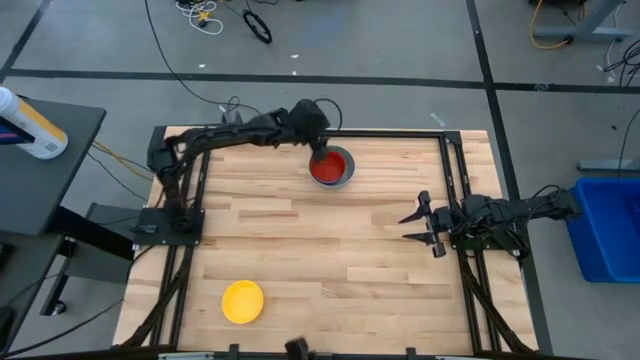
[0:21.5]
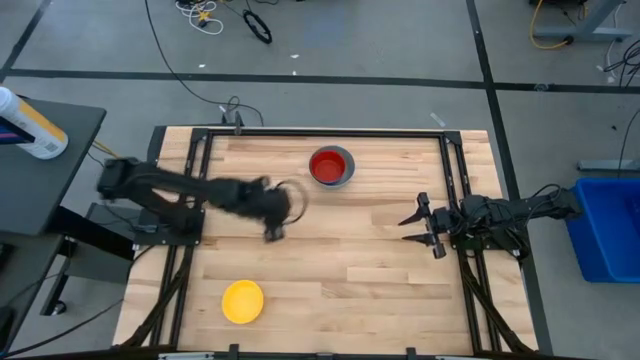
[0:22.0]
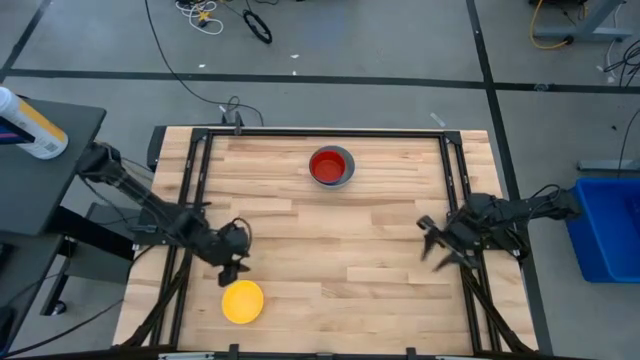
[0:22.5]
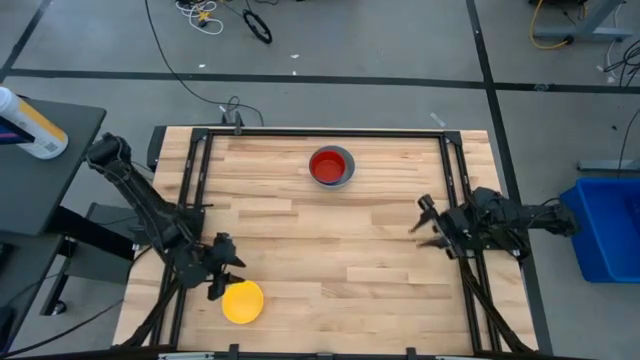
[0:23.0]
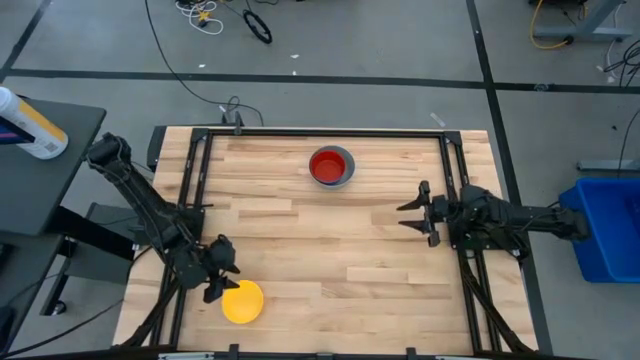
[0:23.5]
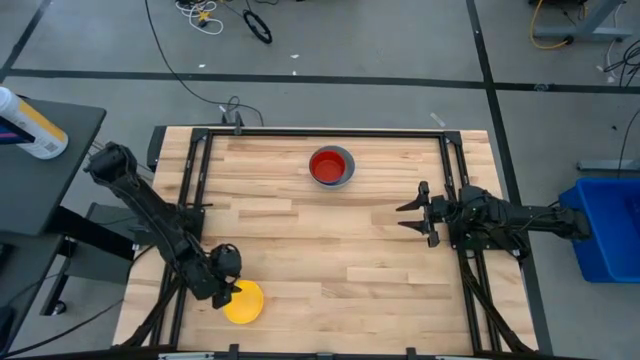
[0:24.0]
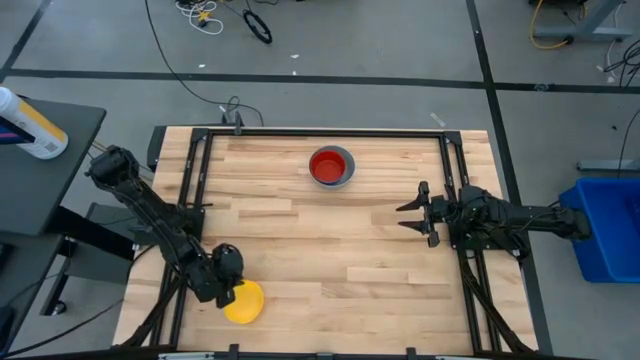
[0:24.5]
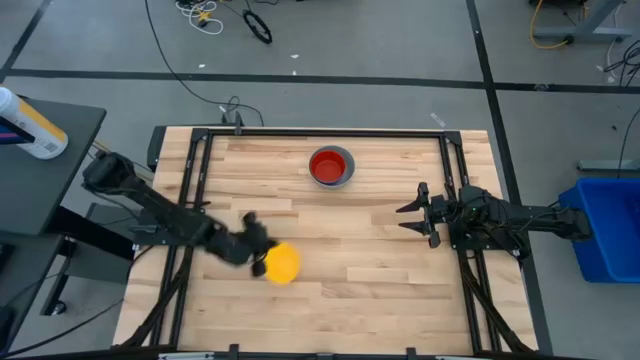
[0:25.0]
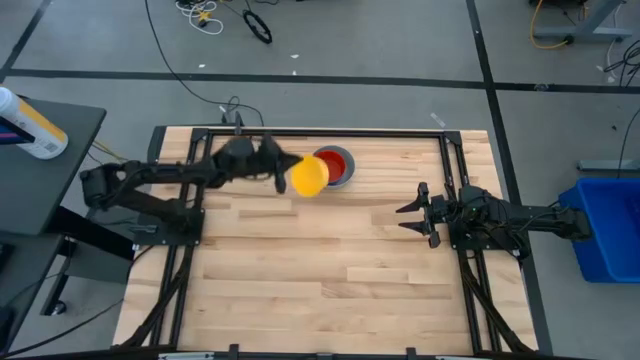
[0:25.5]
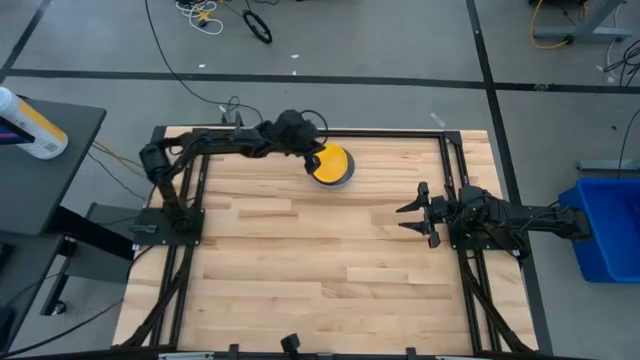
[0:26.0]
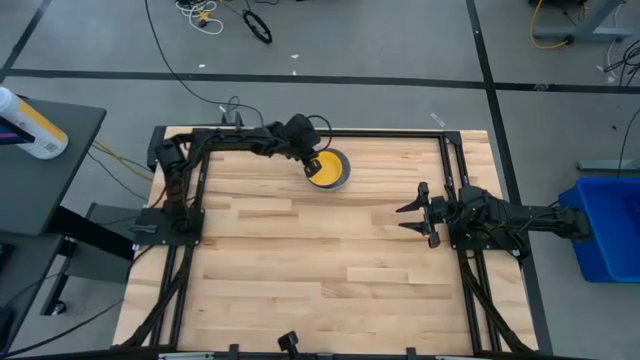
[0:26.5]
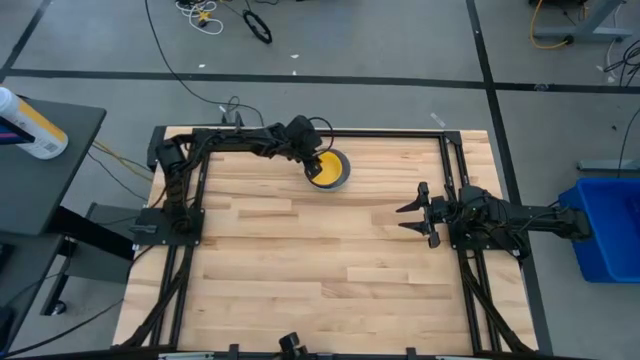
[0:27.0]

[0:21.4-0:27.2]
Stack the yellow bowl on the red bowl

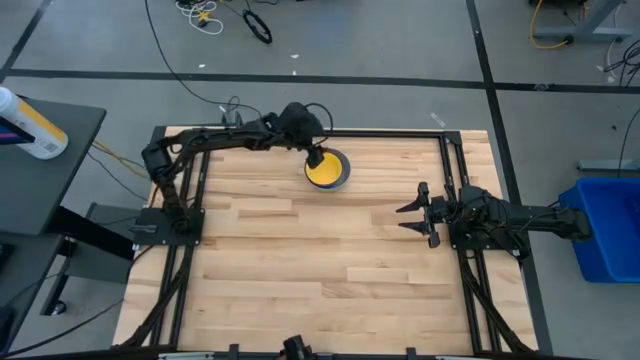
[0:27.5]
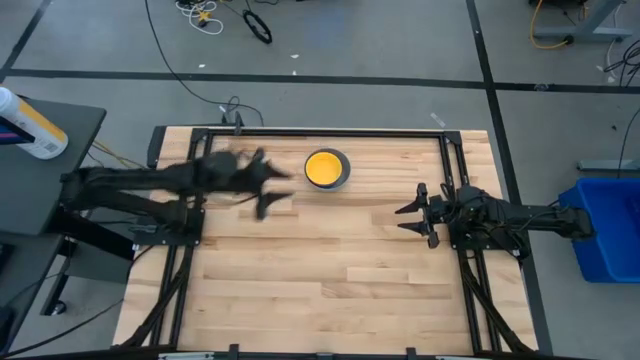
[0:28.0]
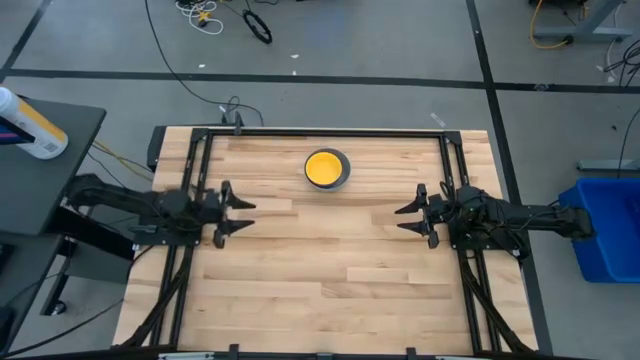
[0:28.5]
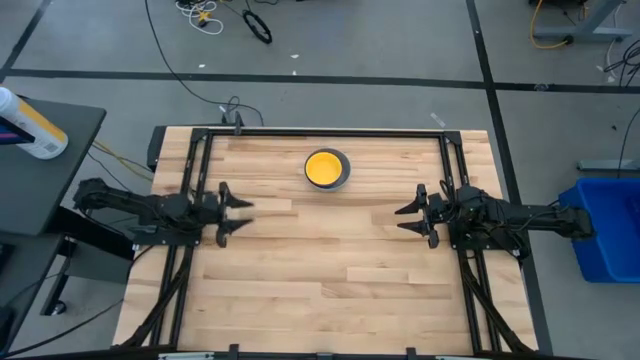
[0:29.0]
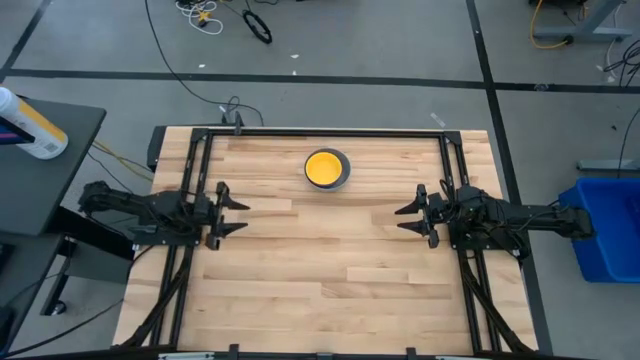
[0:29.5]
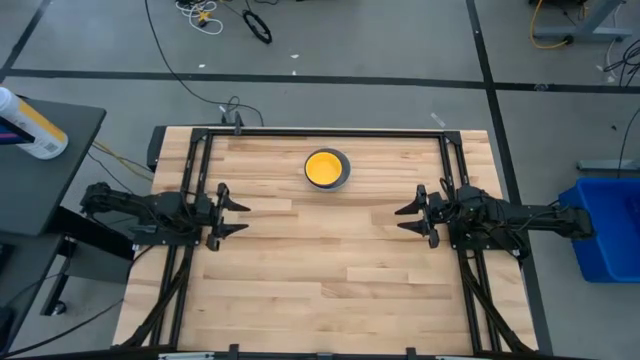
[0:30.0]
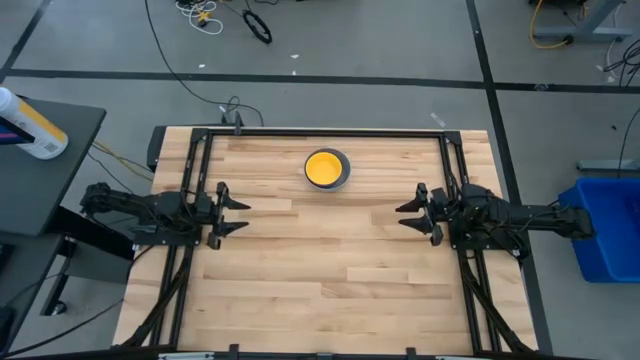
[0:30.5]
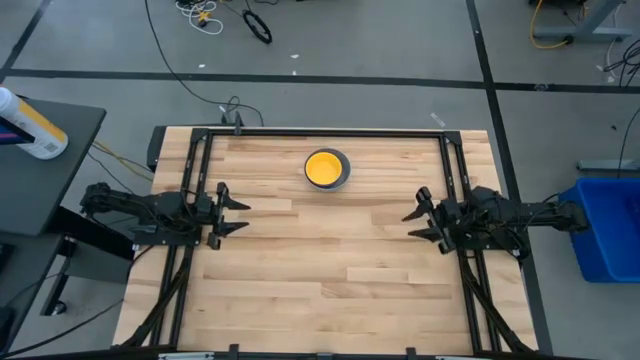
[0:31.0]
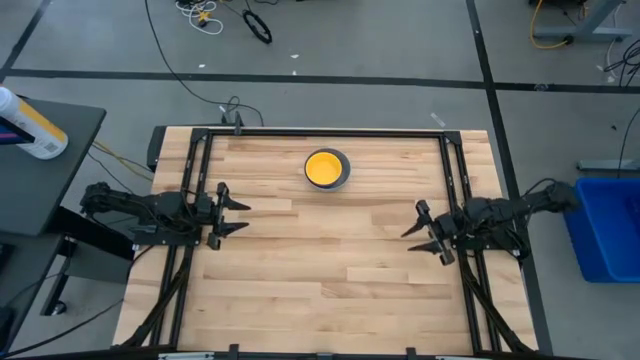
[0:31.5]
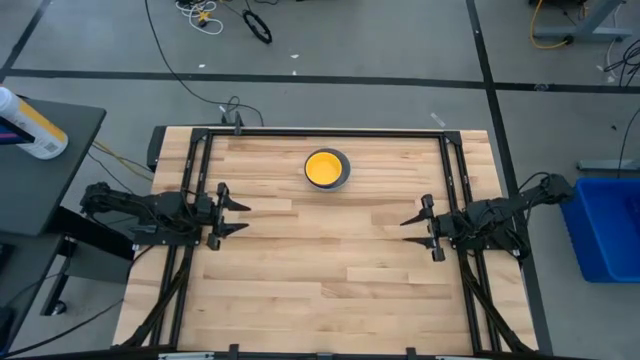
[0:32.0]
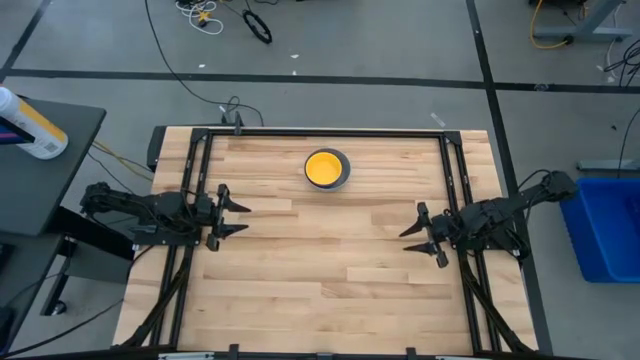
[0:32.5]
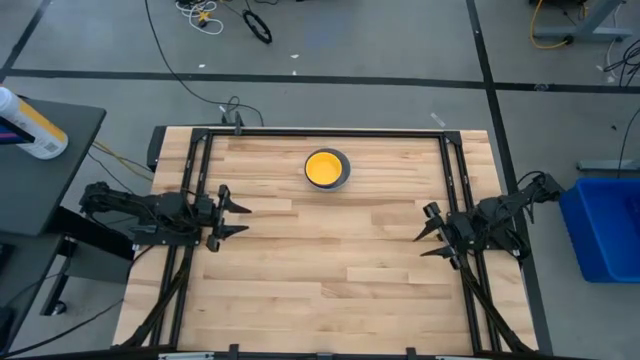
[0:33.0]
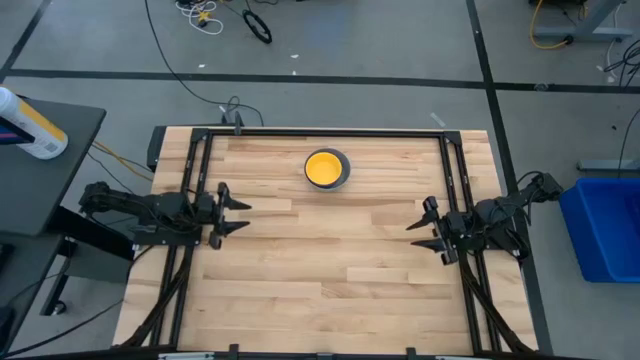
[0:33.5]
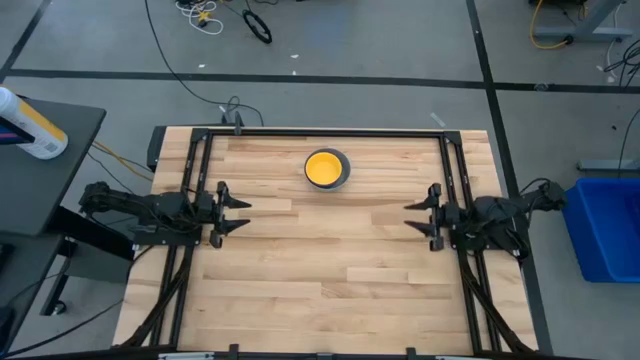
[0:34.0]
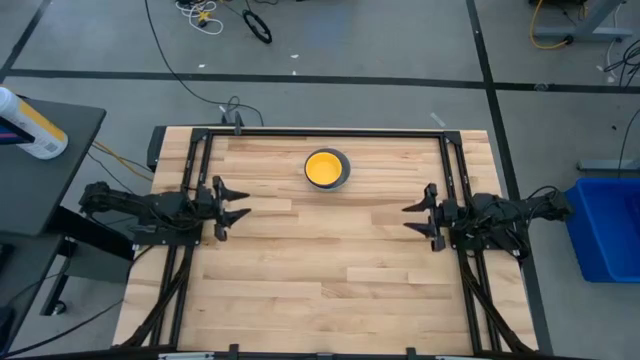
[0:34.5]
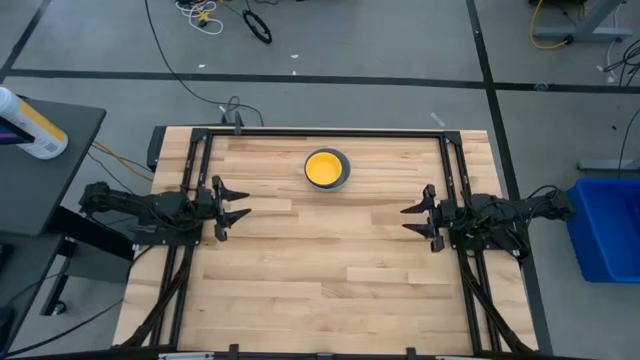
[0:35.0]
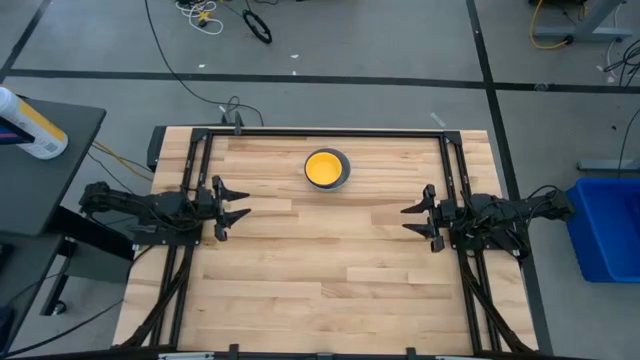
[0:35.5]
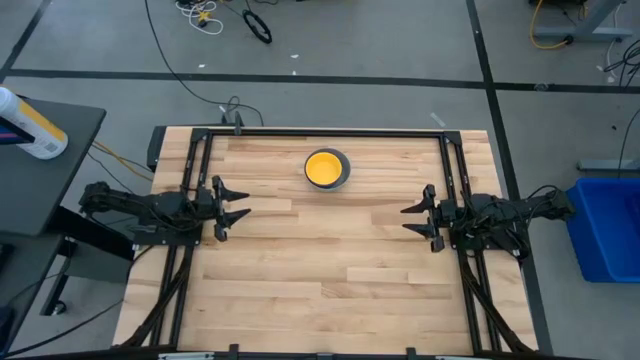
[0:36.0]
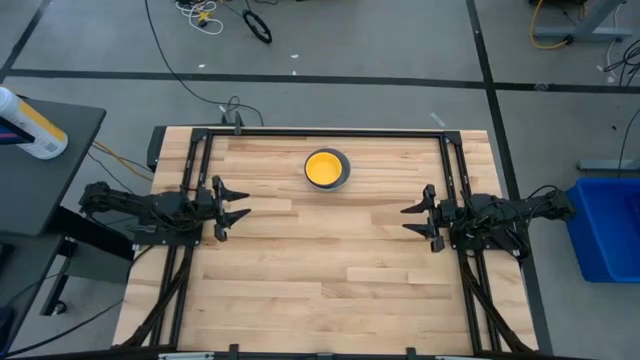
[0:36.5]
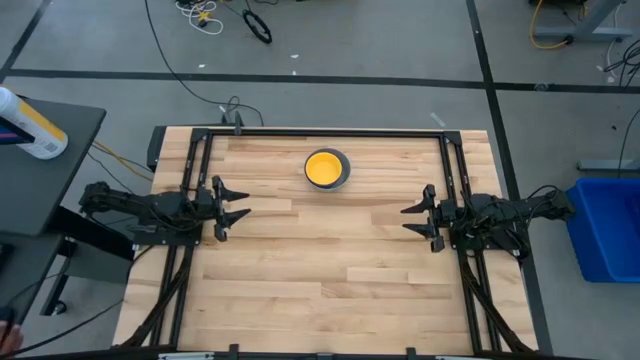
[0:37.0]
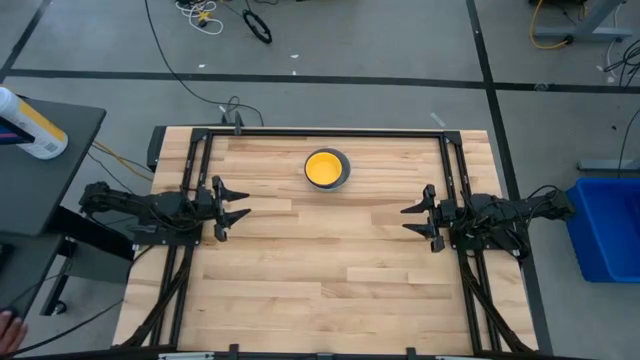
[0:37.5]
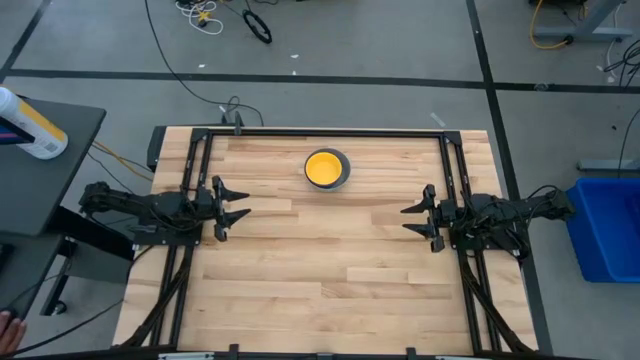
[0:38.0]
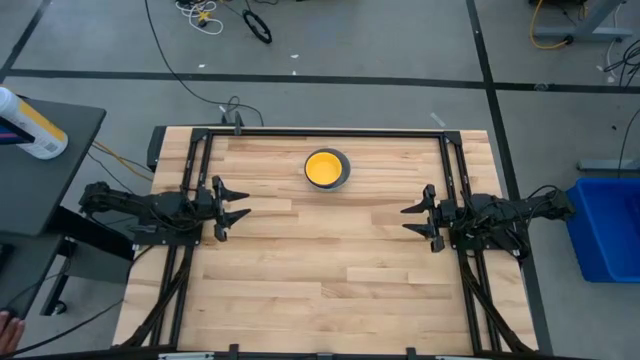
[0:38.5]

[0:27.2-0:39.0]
Return to Home Position

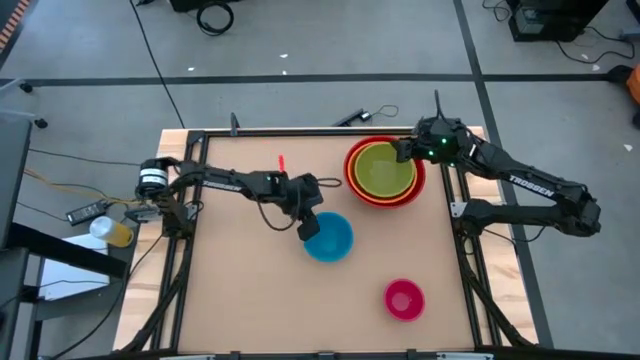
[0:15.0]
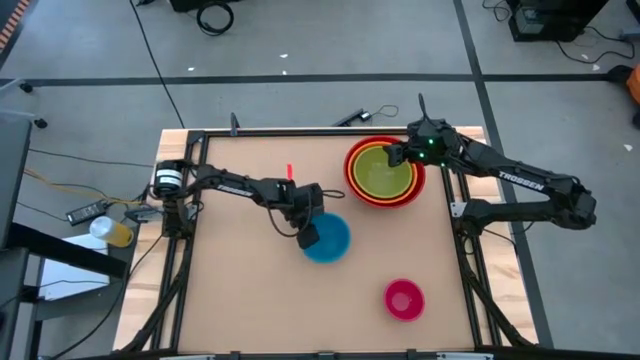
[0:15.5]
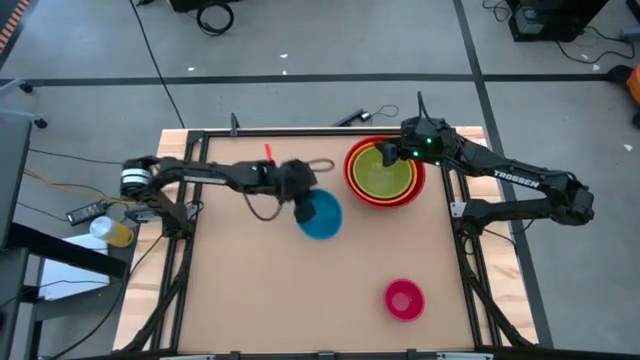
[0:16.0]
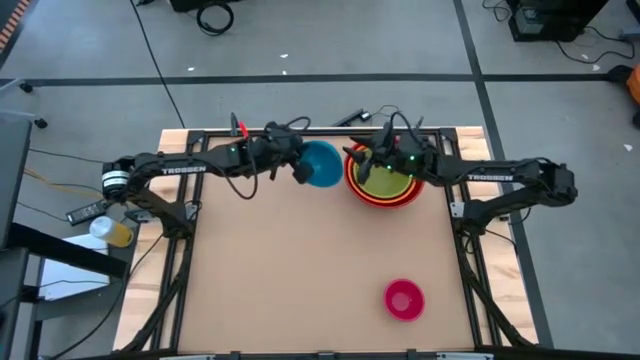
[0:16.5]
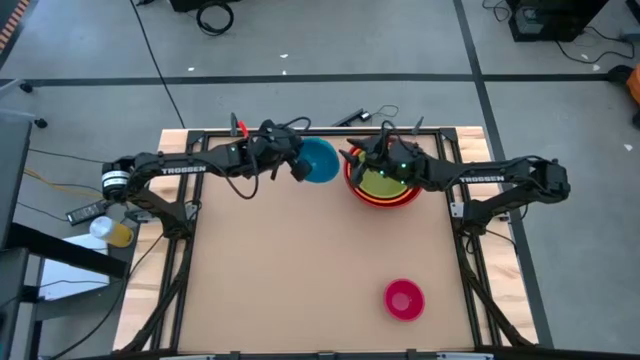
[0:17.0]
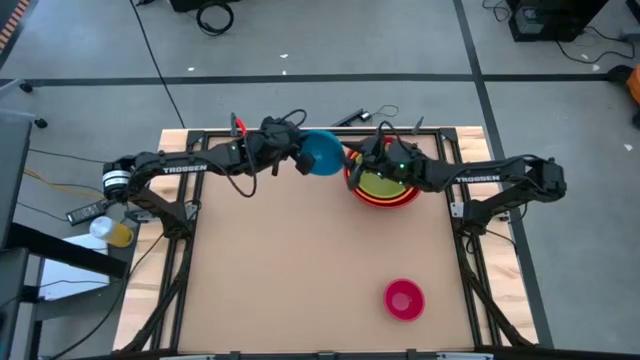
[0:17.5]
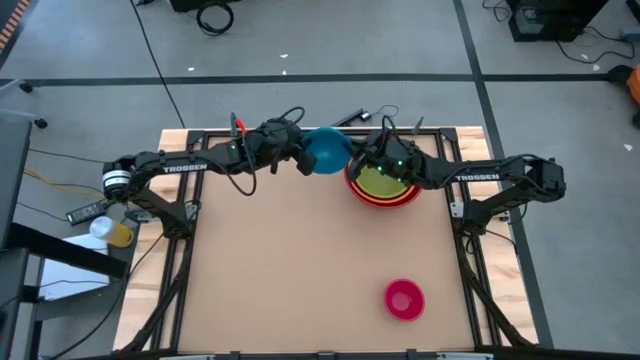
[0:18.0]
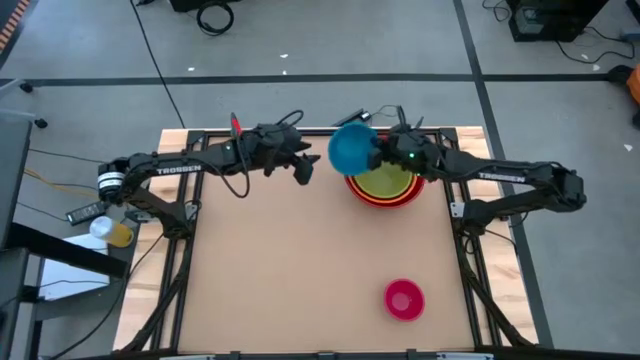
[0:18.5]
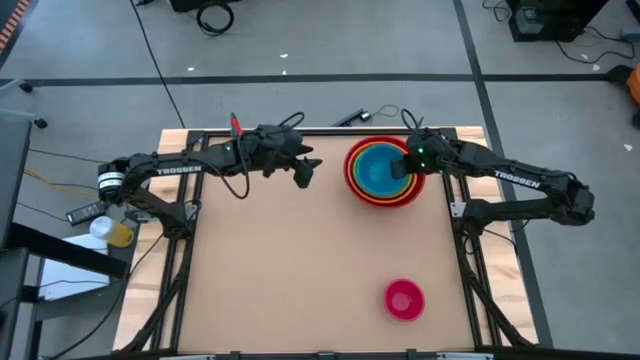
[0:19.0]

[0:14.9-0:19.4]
Stack the blue bowl on top of the green bowl
